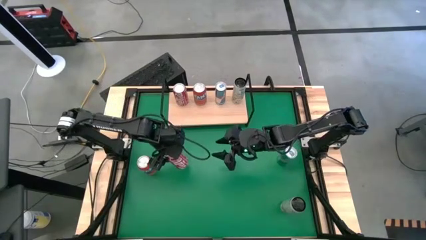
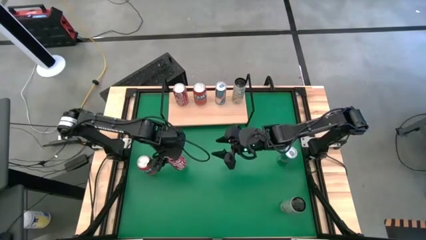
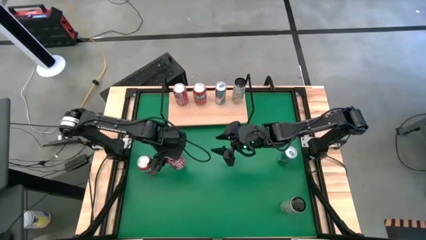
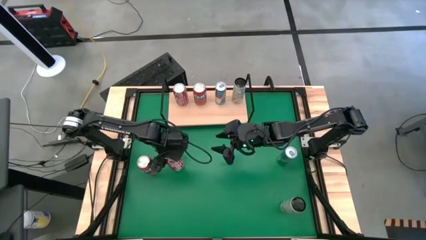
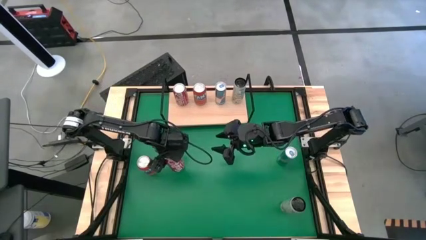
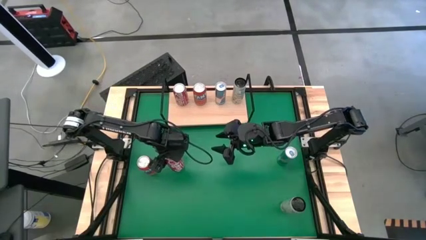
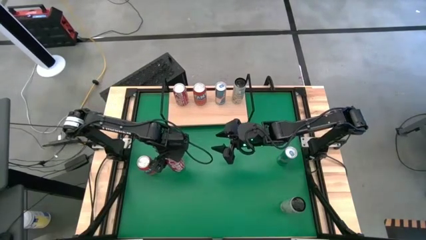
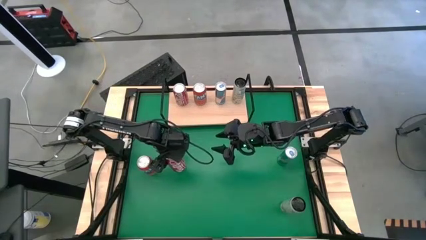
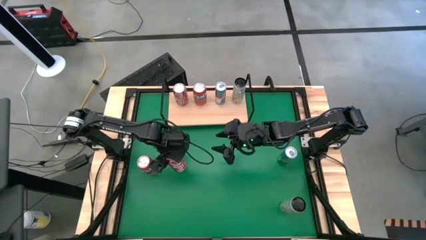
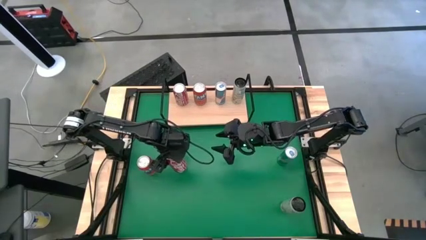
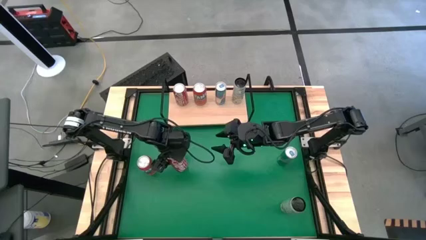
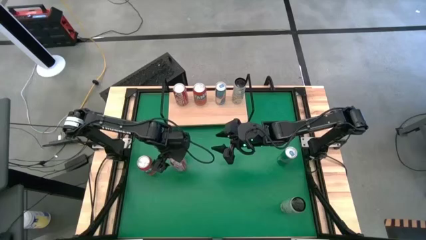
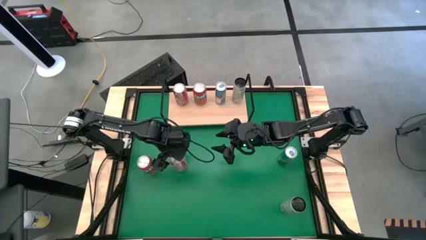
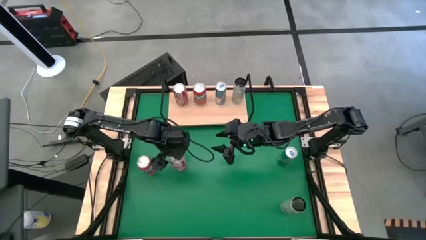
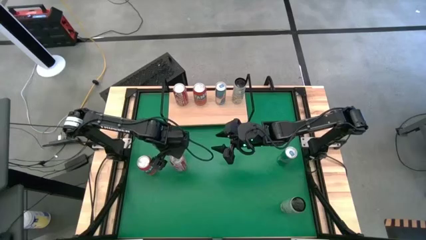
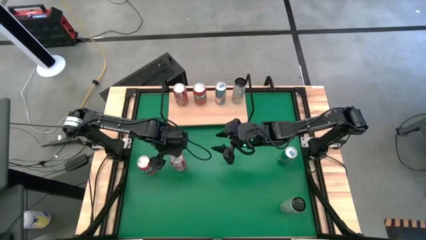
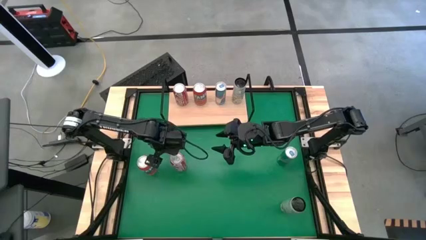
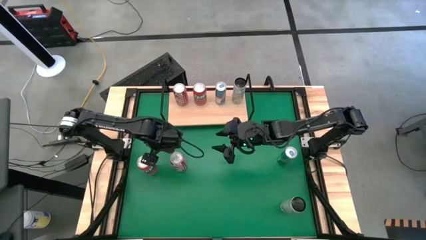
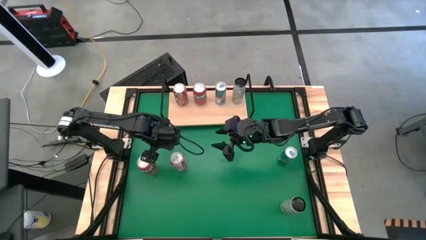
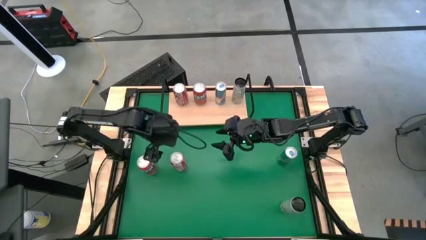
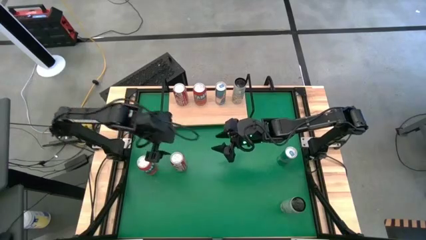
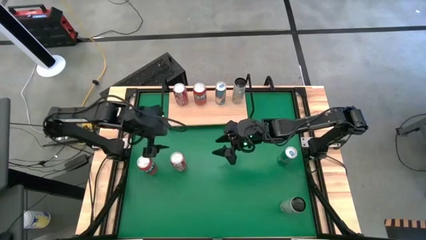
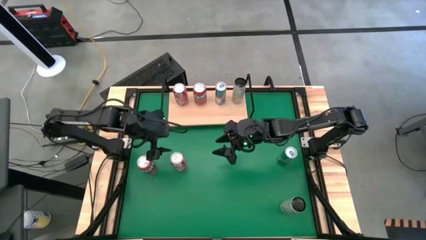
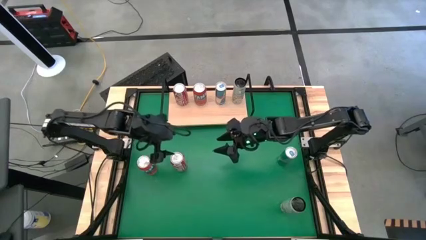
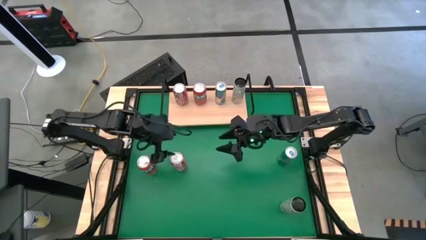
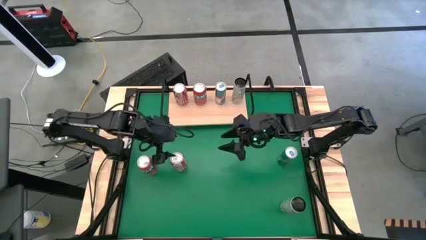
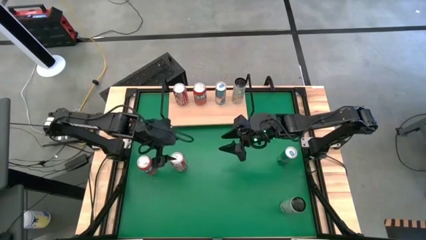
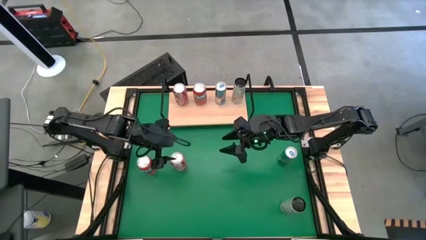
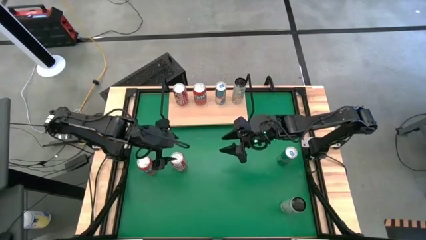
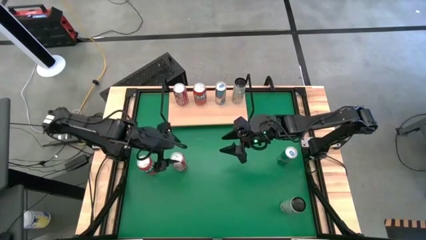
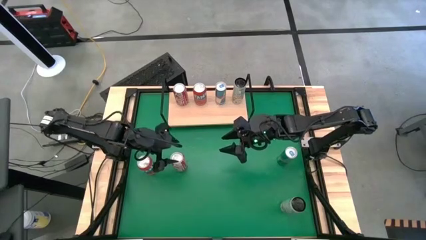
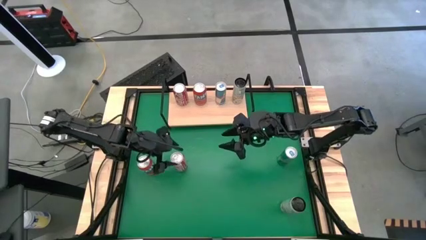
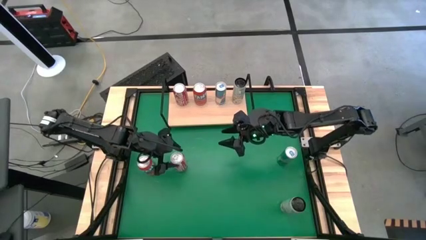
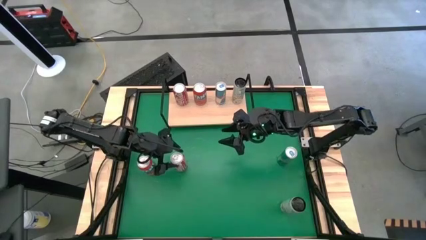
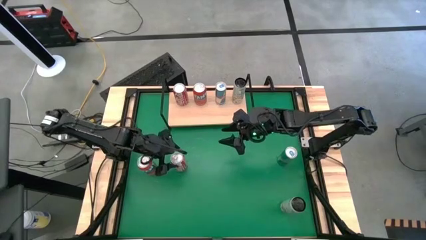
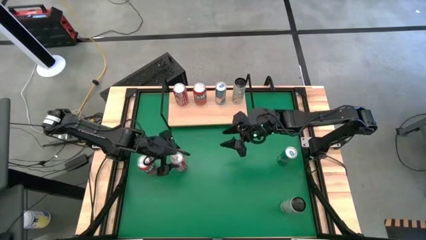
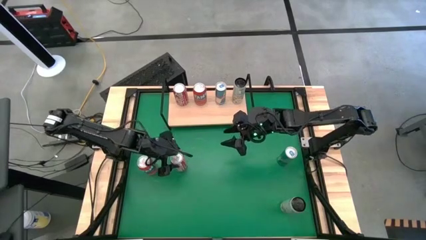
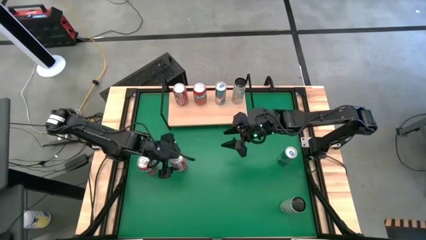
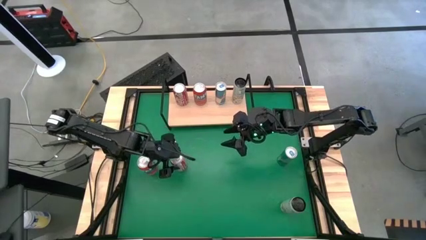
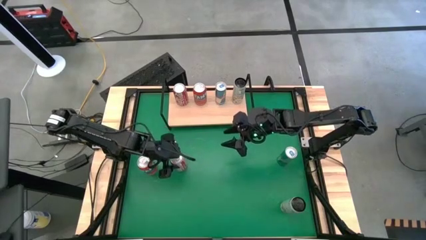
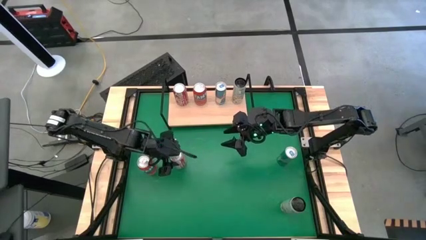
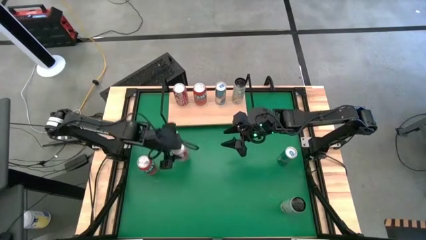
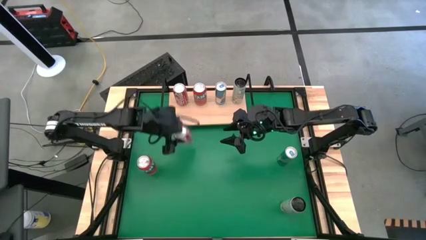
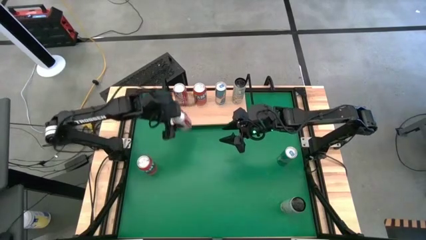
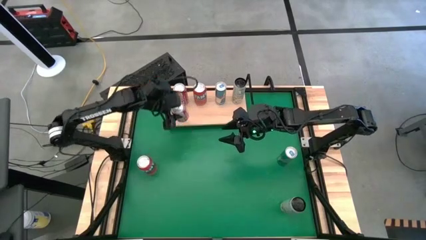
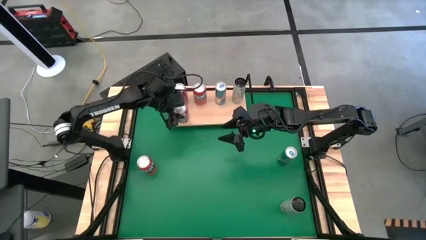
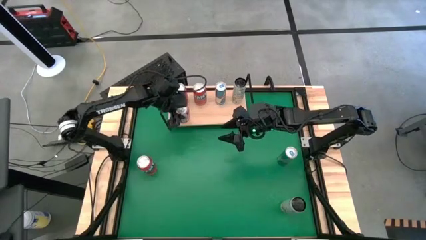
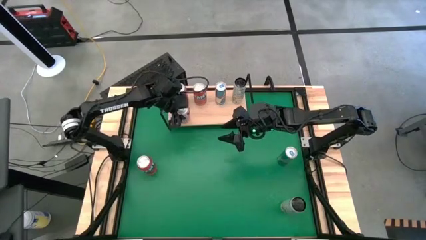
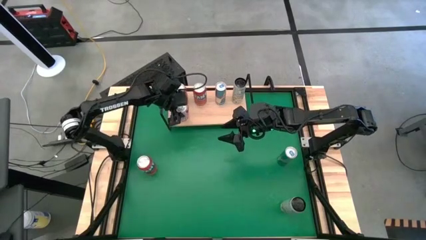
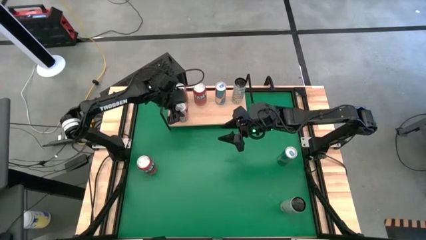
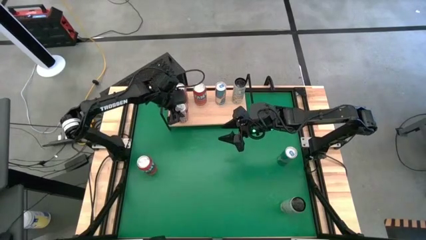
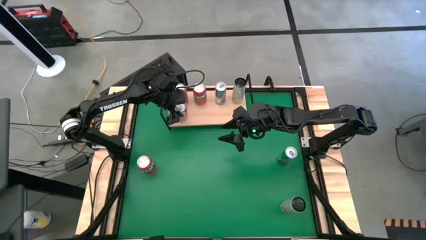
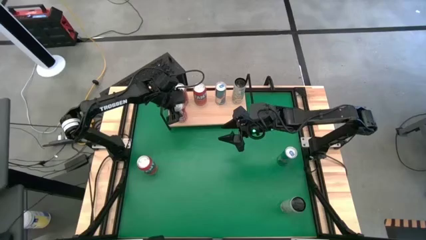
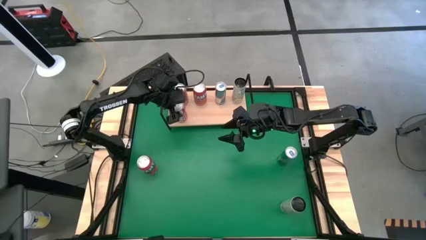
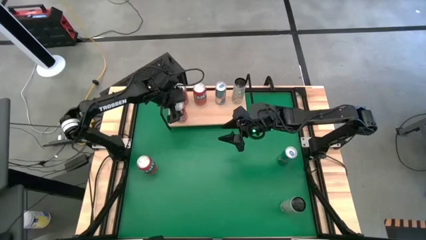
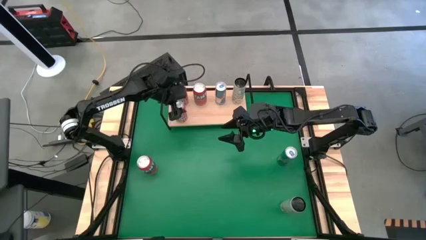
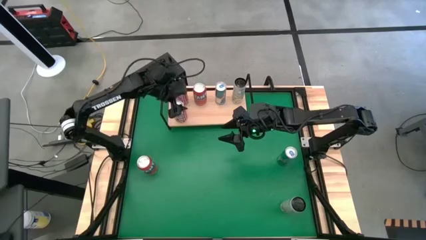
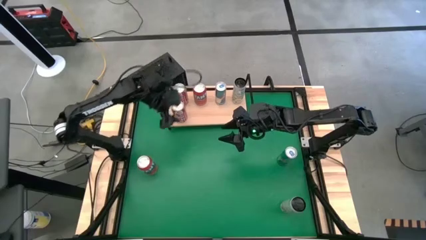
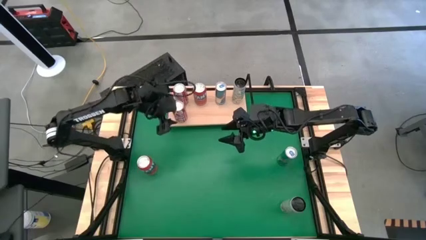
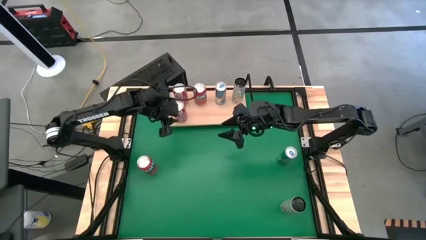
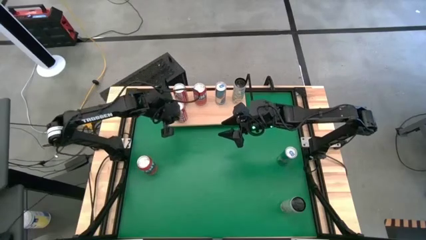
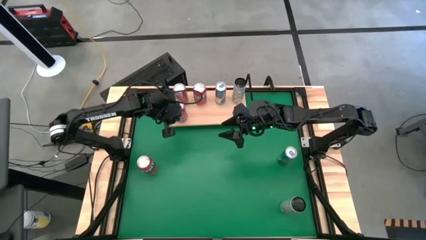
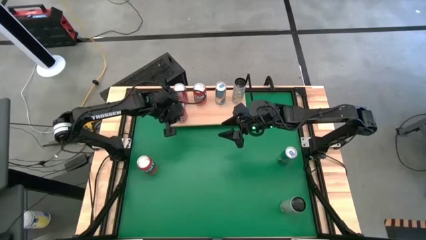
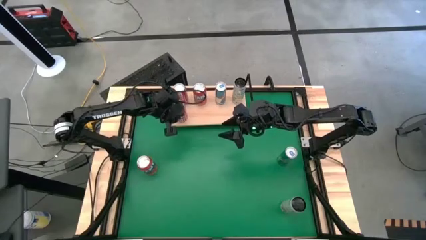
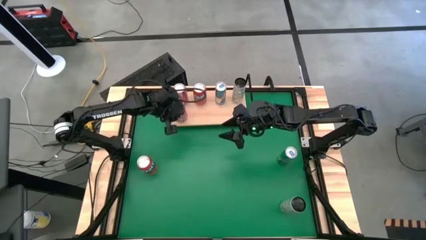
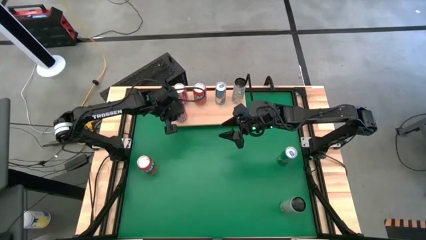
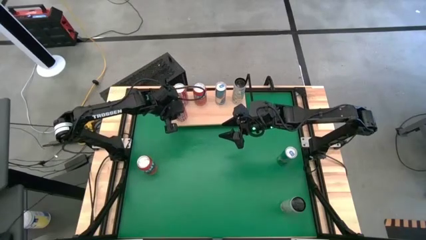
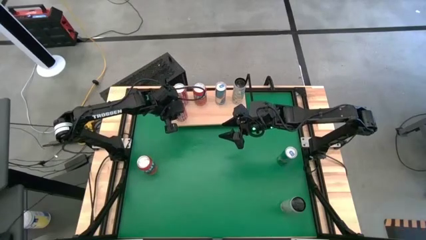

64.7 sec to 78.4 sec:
Task: Place canned beverage on shelf
Put the red-black soda can on the shelf aligned with the other red-black soda can

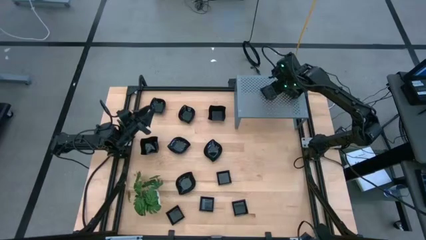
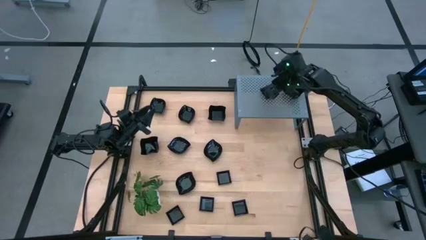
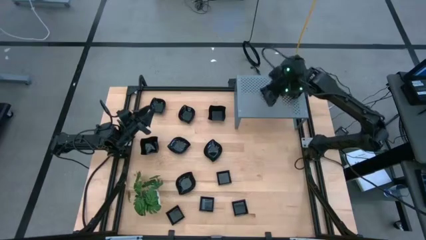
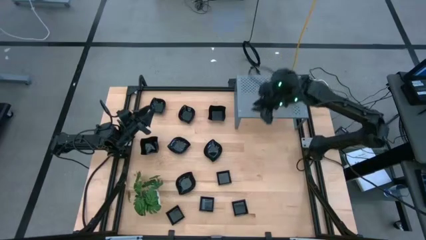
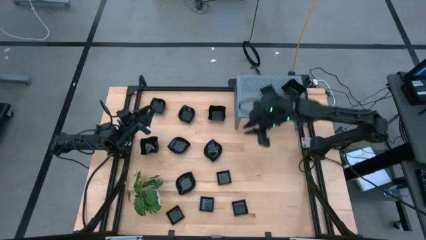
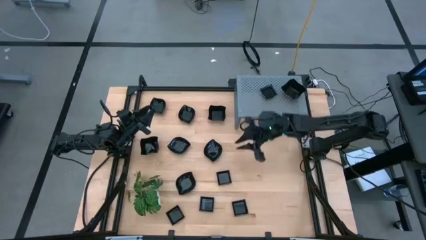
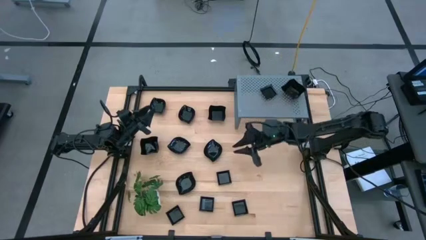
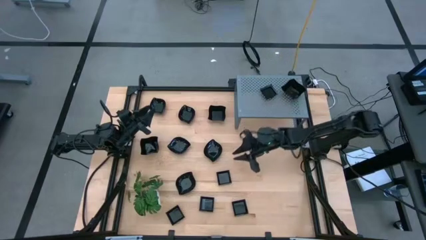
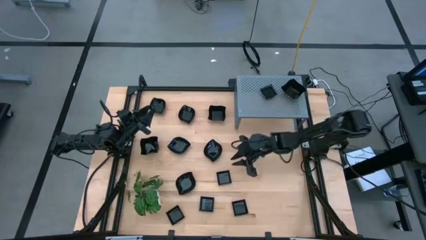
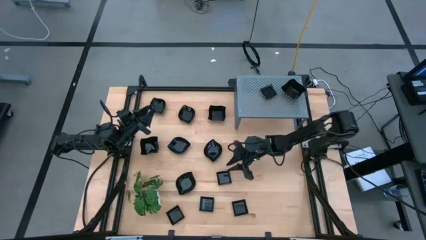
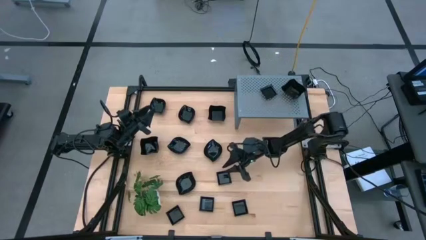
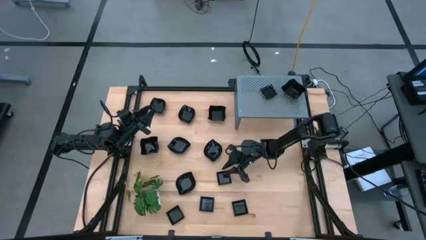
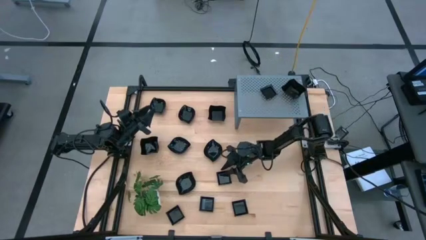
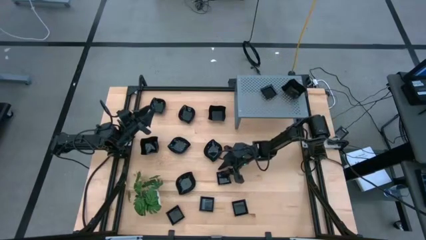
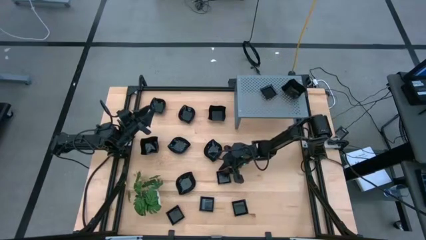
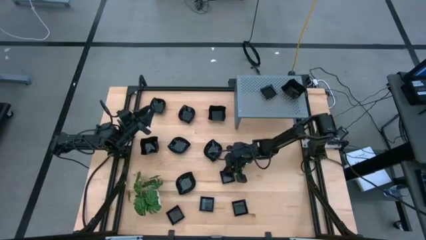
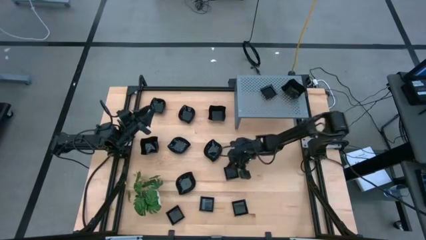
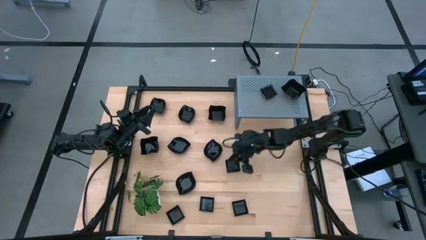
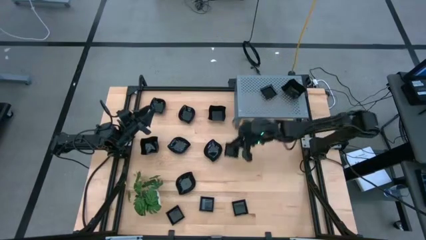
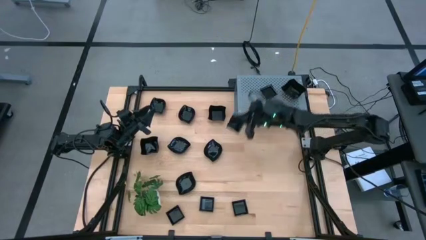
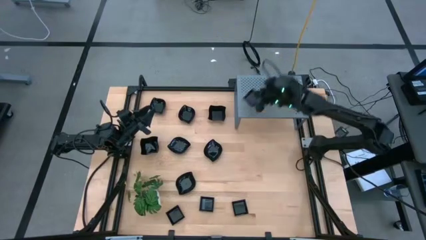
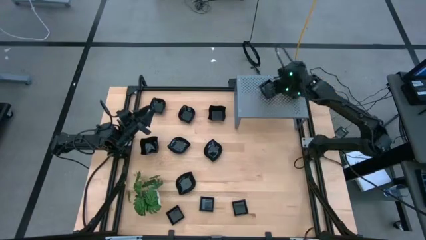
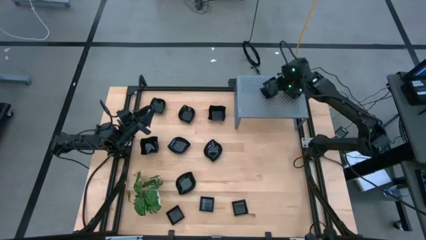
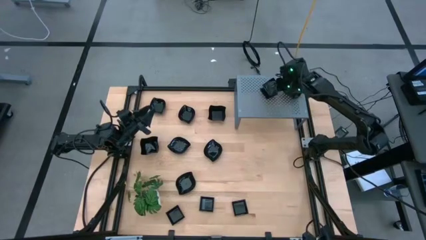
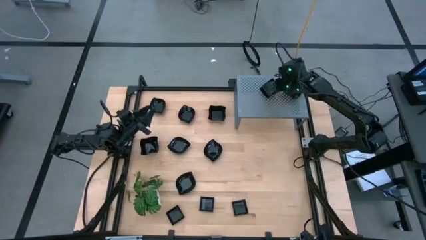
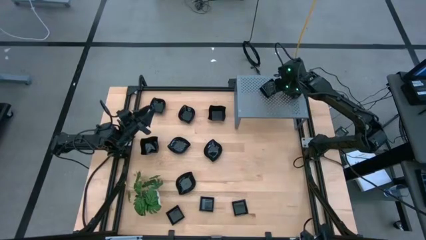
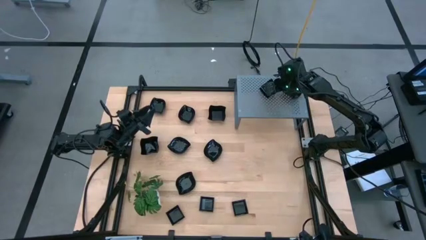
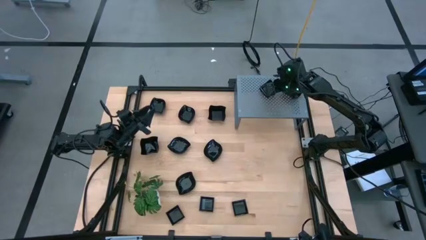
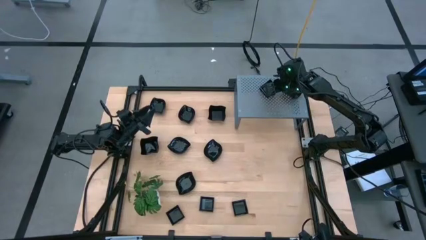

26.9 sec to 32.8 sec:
Task: Pick & Place Mini shaped plates
Stack the square plate on top of the other square plates
